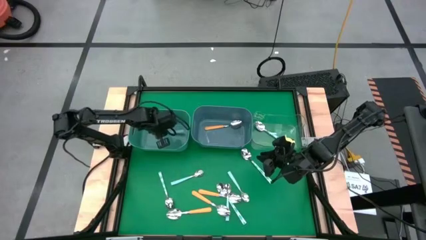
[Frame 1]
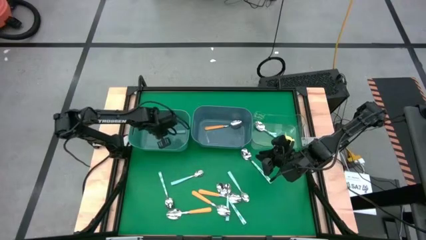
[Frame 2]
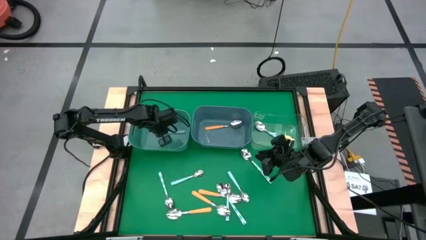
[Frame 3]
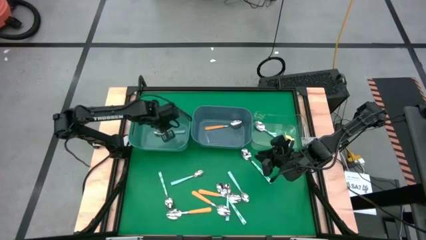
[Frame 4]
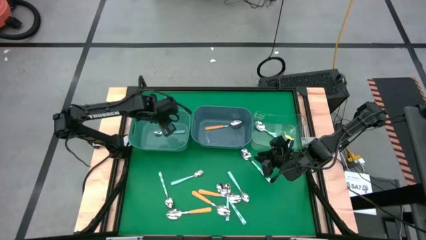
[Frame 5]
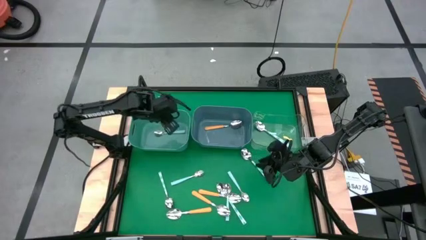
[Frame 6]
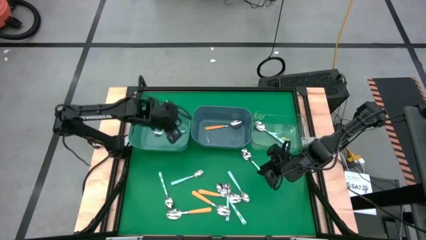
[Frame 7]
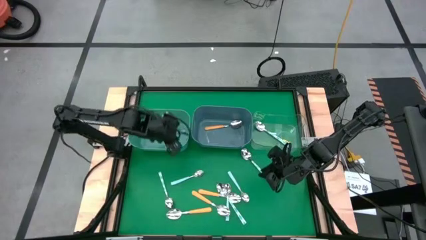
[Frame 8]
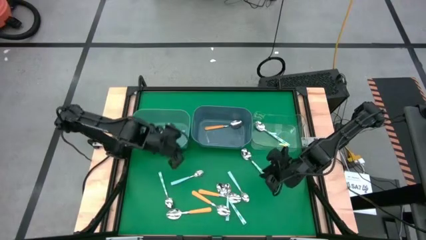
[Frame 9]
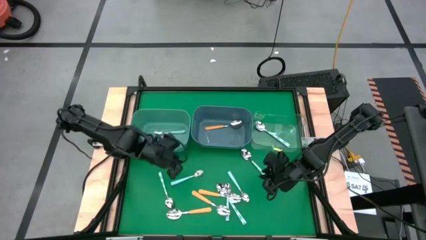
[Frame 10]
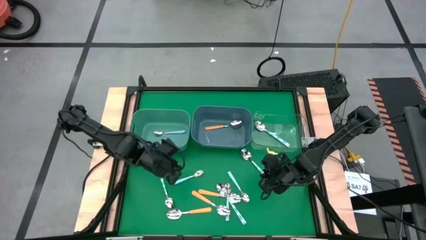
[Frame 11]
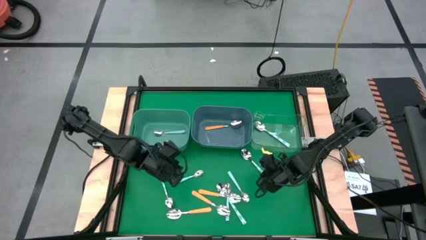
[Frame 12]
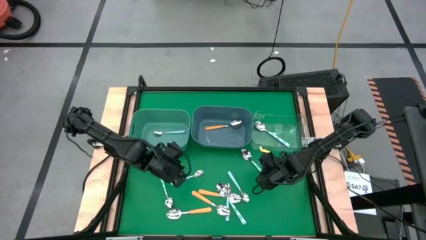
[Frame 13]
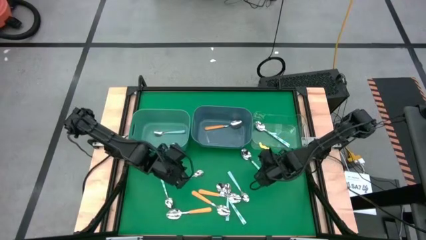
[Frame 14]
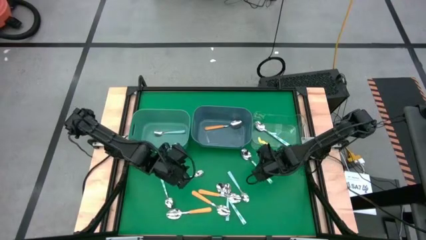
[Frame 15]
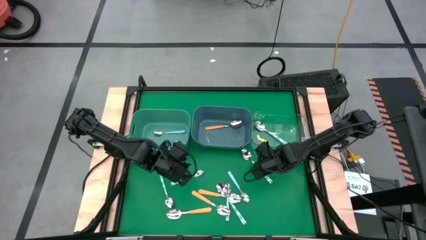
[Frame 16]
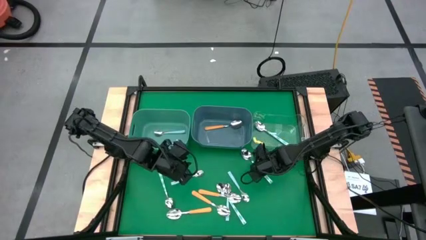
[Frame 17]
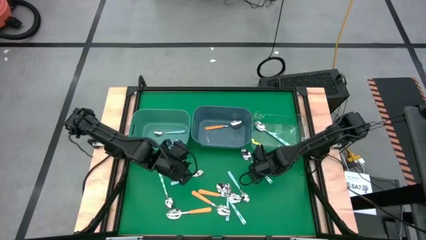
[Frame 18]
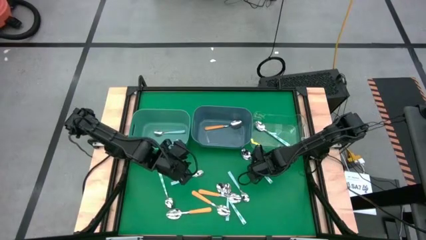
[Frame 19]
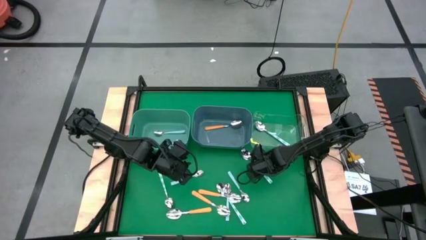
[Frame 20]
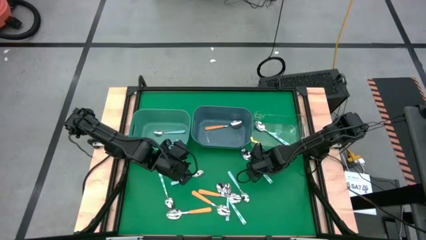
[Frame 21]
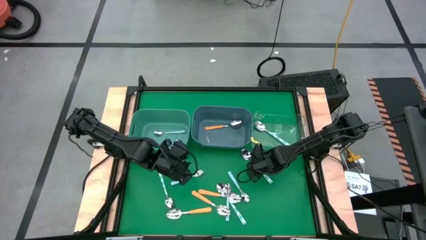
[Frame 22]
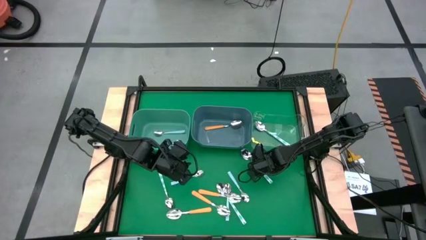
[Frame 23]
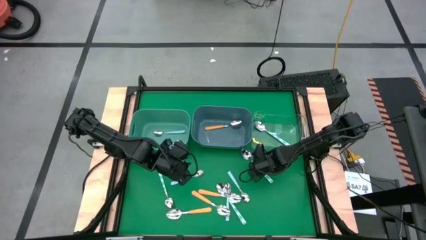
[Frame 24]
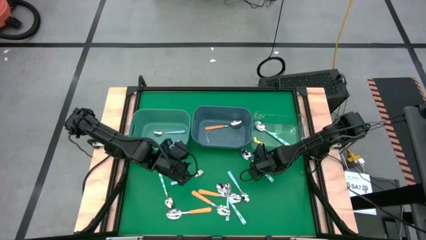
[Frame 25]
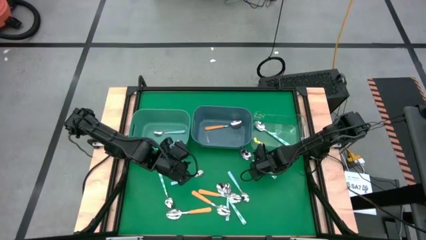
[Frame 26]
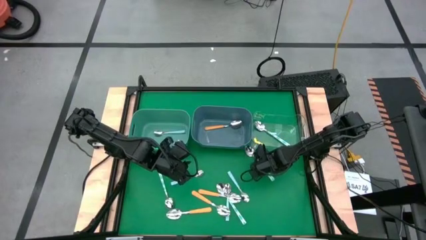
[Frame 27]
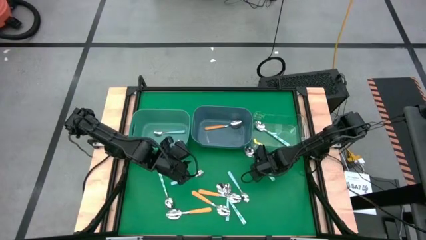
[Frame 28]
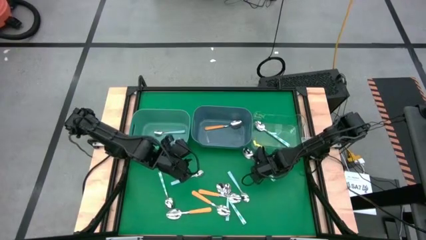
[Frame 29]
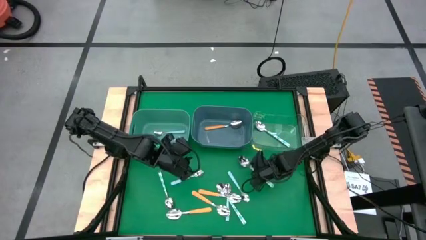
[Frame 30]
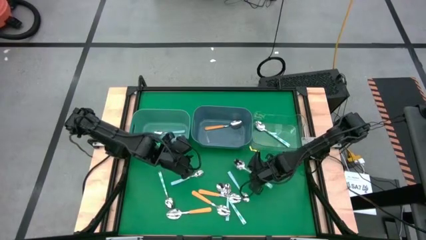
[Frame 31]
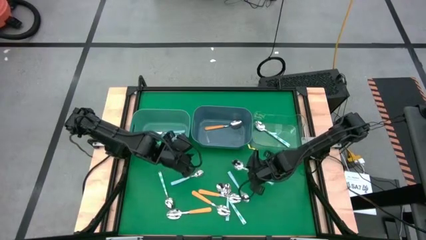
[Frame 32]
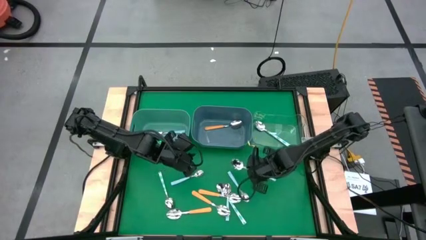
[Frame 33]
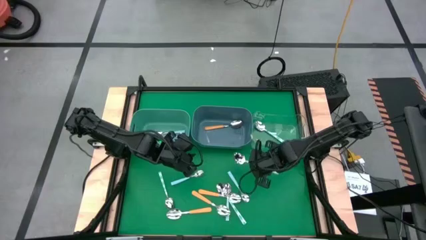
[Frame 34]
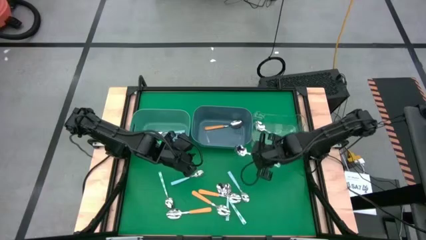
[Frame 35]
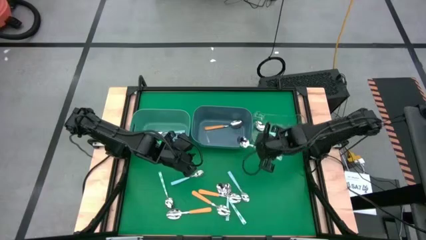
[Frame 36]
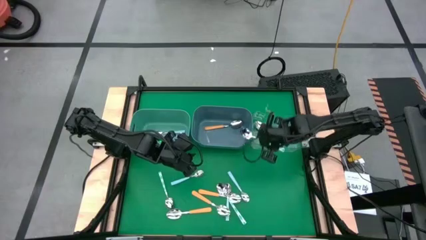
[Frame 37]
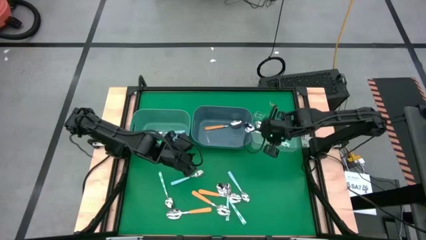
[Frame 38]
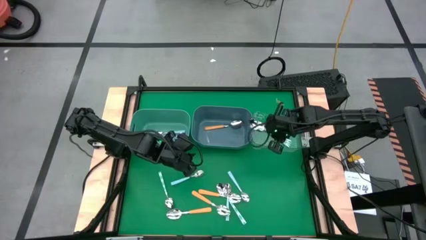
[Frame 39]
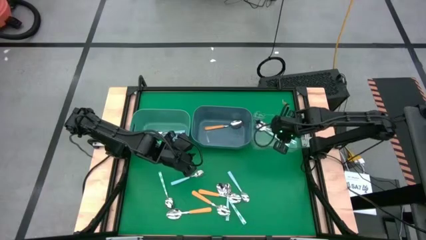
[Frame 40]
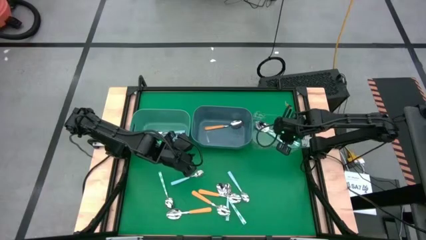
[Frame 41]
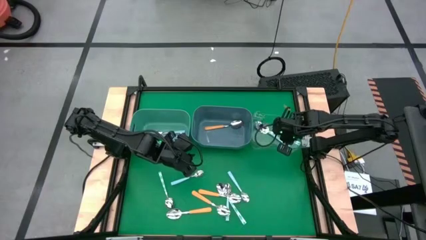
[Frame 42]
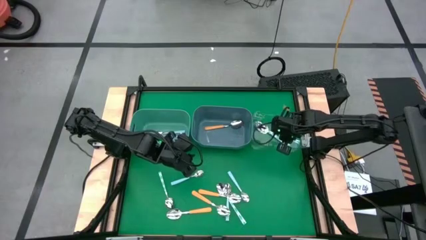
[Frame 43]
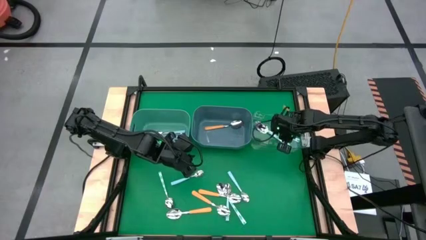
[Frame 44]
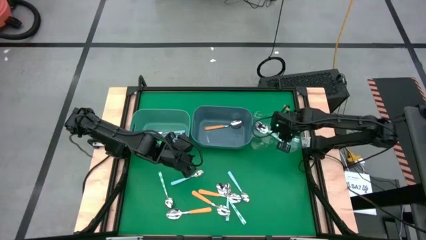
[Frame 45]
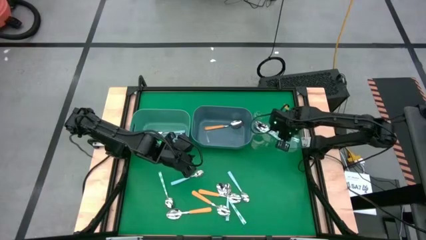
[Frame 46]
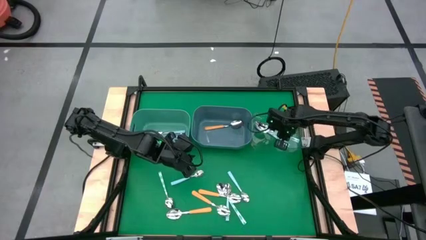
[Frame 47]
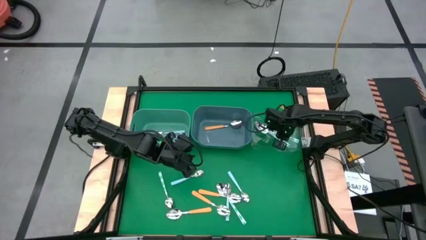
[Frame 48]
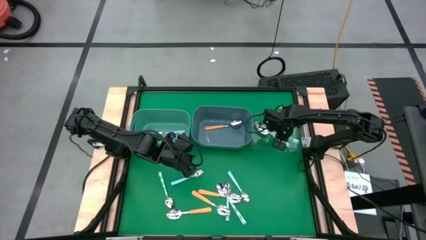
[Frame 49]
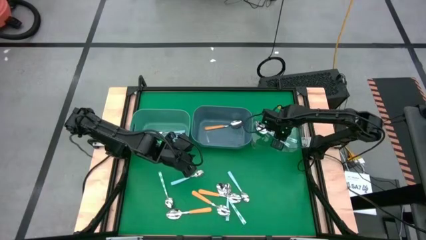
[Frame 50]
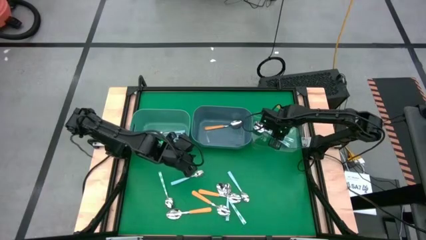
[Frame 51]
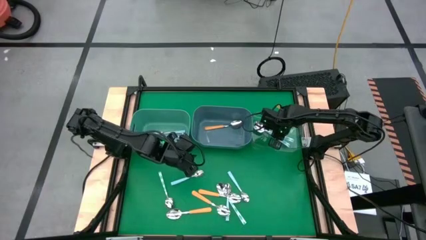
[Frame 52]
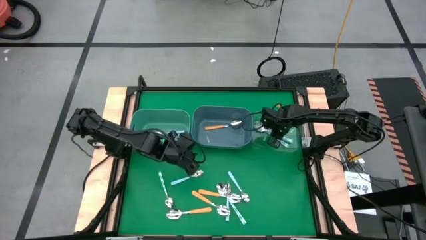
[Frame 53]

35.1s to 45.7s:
Task: Sort silverware by color (type)
Put the white spoon into the transparent bin

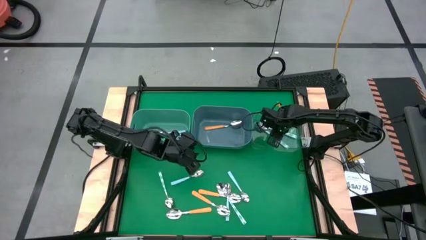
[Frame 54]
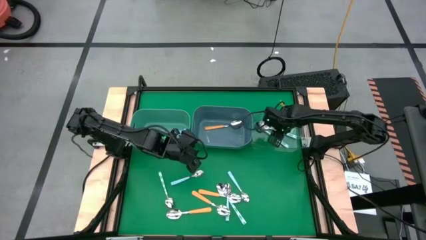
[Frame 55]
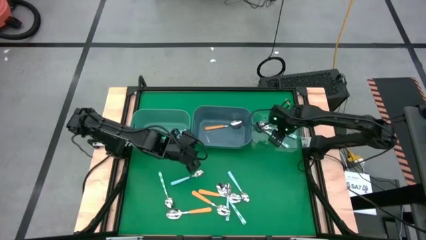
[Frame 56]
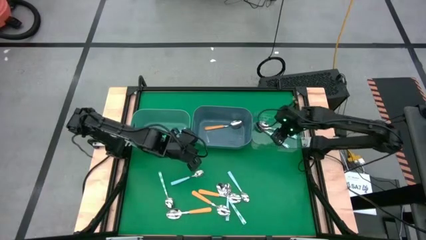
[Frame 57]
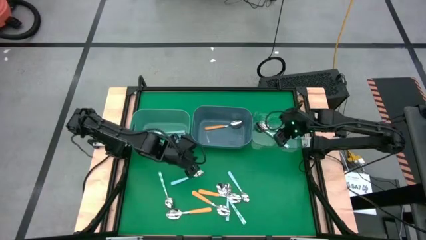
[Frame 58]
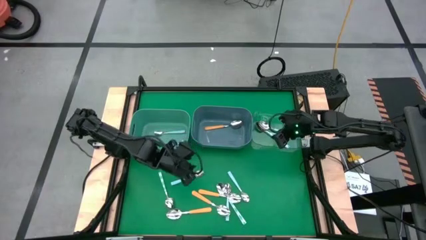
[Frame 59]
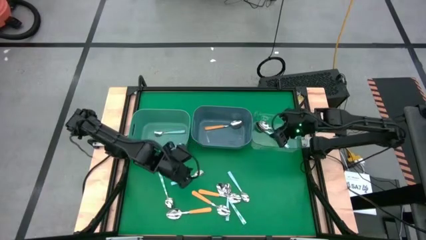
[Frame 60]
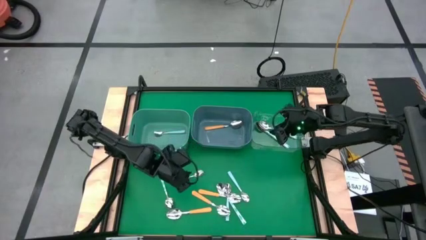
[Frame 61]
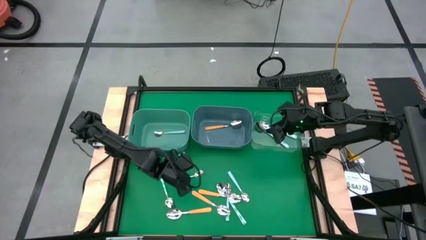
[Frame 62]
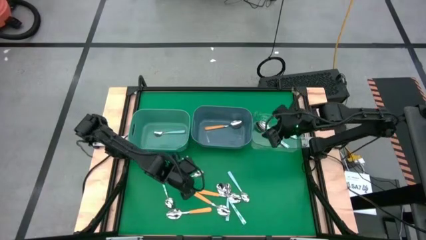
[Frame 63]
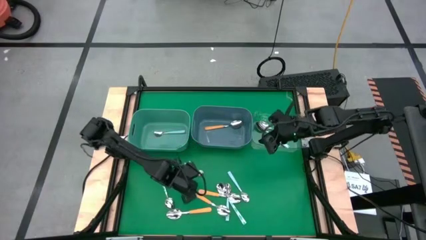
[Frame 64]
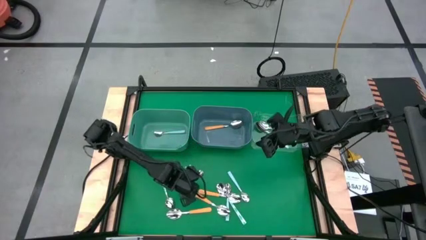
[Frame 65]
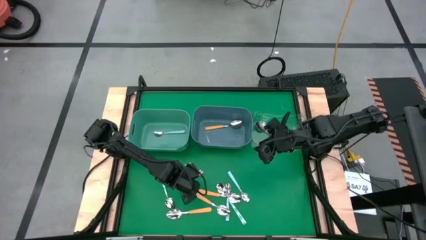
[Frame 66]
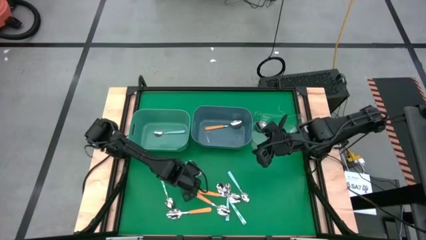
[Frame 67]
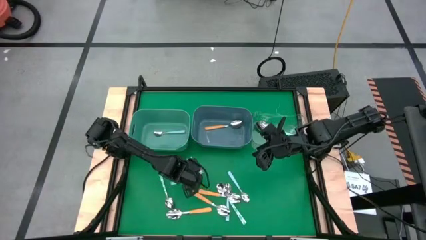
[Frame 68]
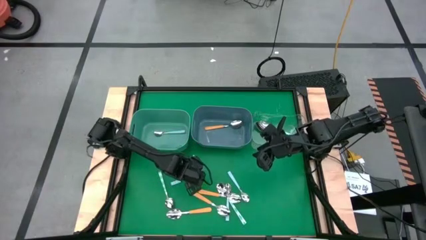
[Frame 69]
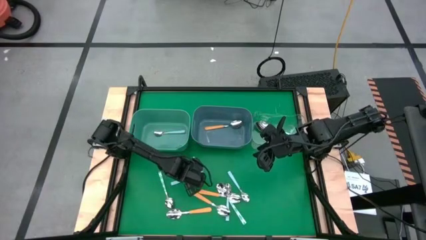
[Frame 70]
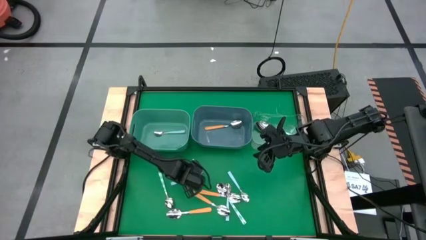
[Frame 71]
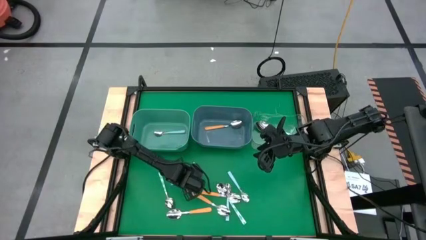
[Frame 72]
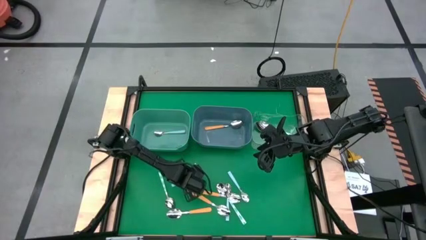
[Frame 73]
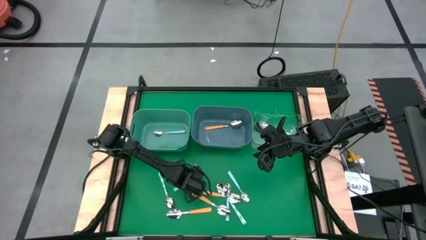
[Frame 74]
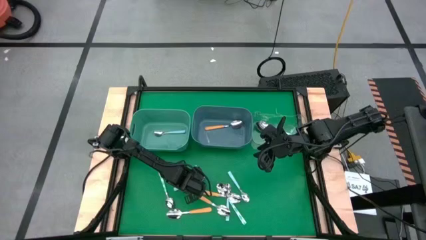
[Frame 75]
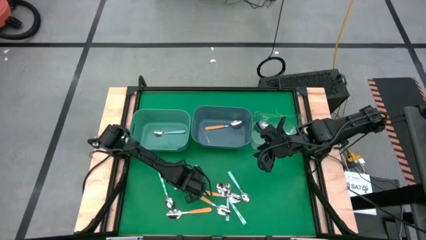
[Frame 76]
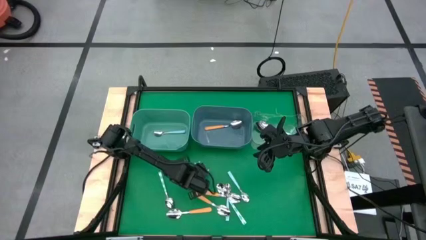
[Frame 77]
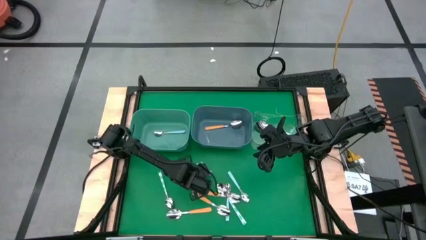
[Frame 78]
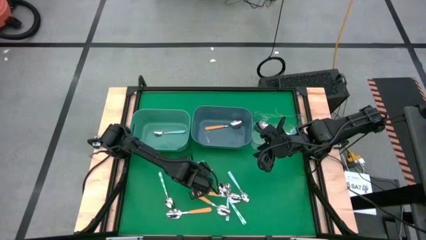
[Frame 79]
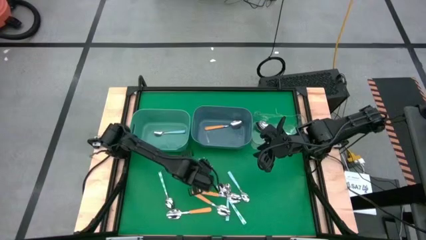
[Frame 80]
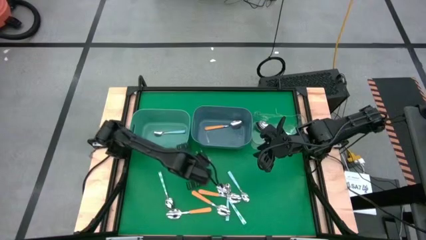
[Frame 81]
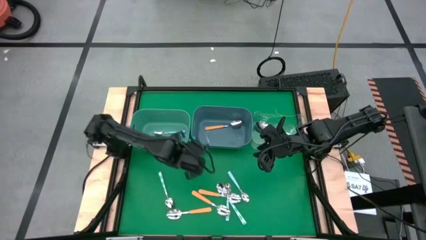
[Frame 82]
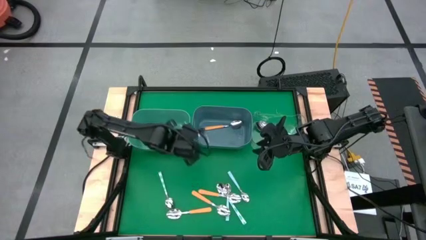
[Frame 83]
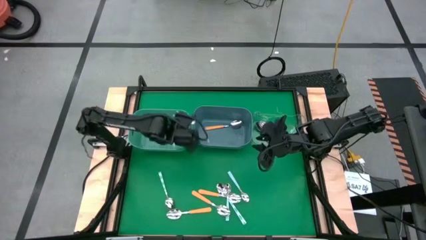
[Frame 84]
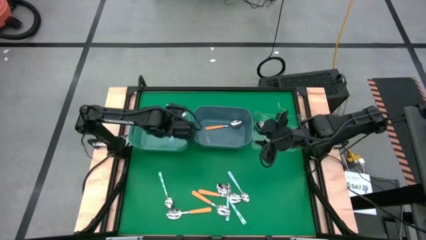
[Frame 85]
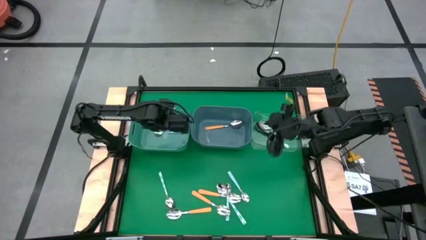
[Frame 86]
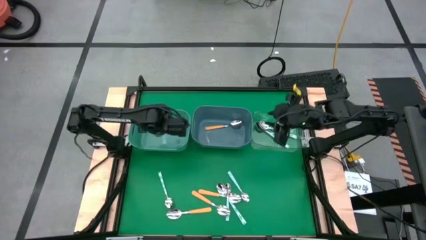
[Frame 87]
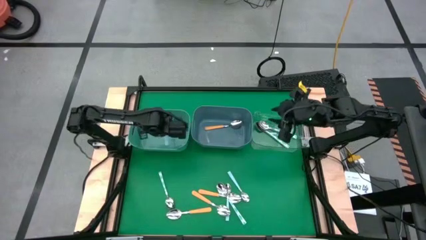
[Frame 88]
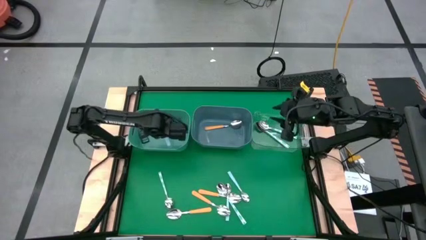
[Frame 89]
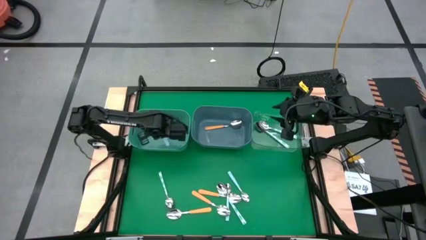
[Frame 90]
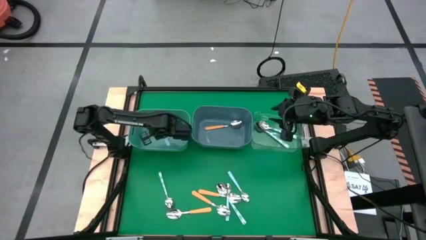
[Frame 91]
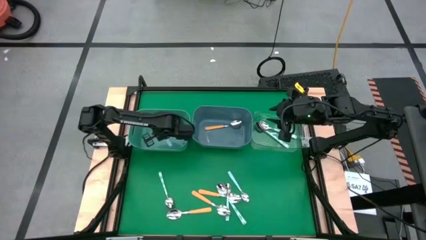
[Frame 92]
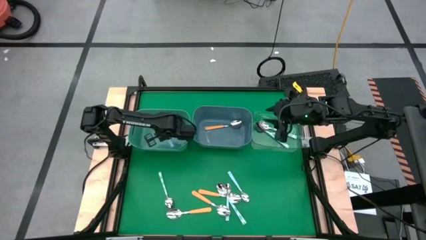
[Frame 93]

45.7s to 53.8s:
Put the blue spoon into the green bin
